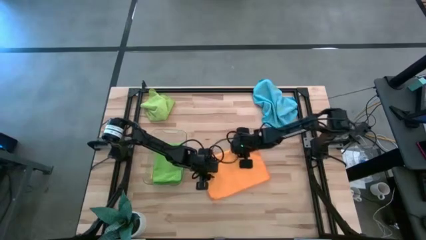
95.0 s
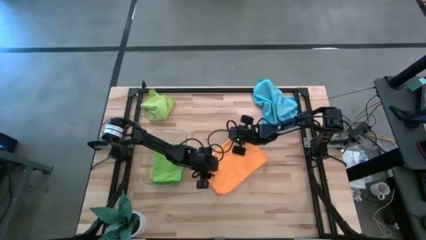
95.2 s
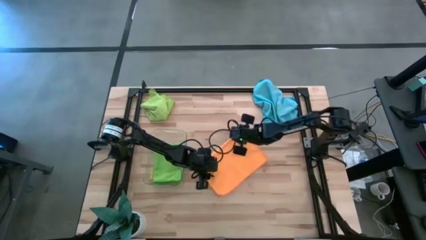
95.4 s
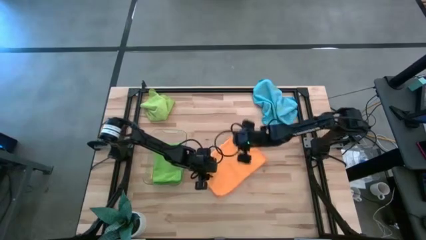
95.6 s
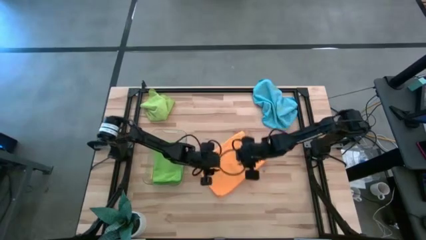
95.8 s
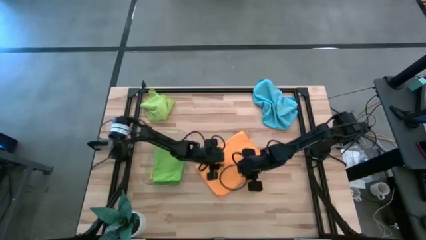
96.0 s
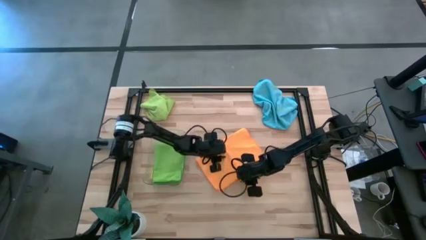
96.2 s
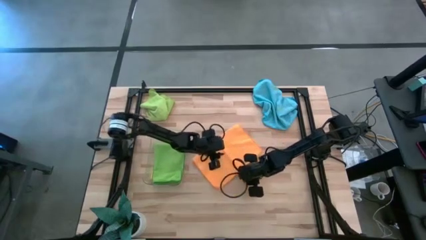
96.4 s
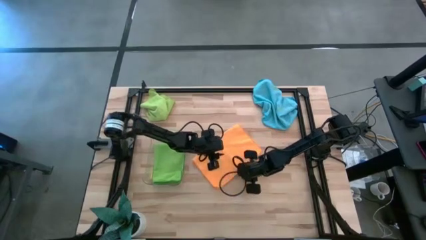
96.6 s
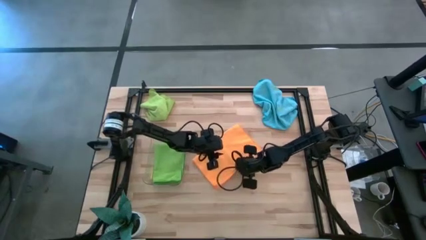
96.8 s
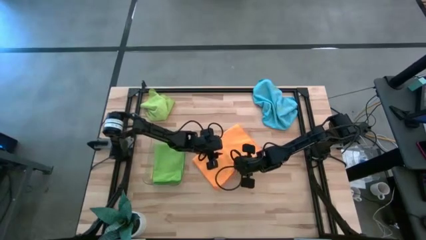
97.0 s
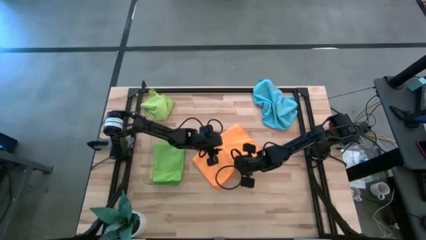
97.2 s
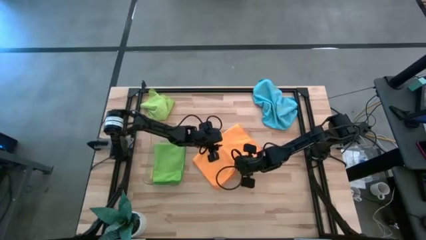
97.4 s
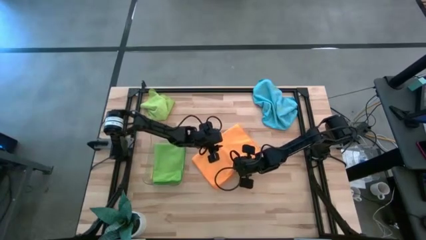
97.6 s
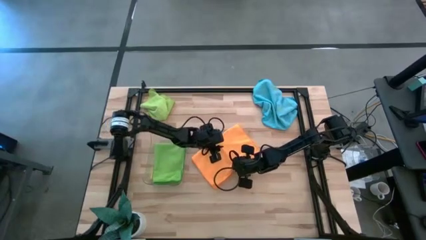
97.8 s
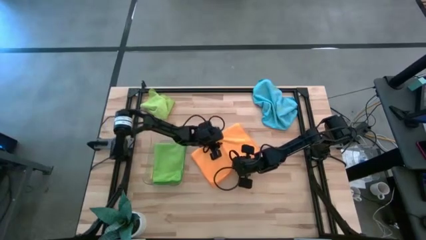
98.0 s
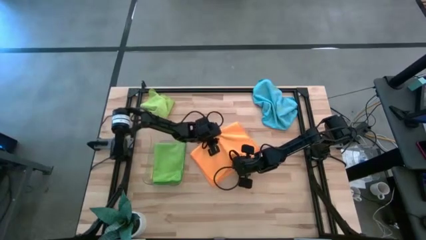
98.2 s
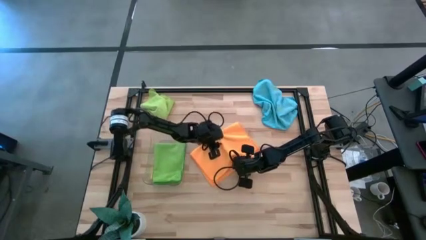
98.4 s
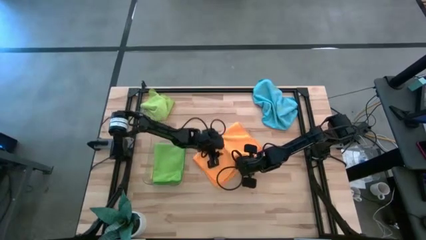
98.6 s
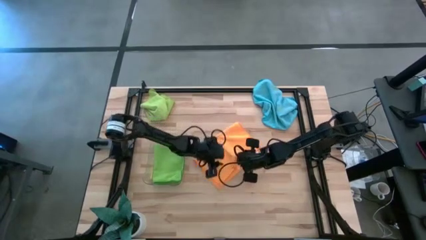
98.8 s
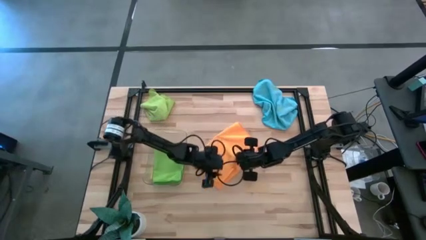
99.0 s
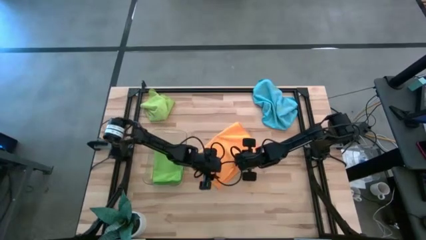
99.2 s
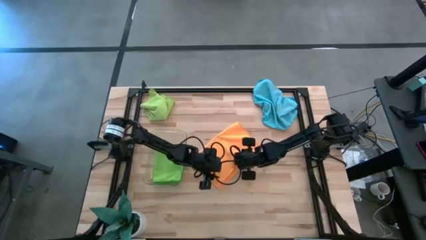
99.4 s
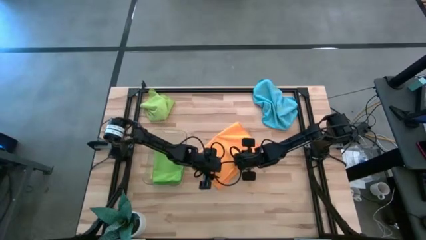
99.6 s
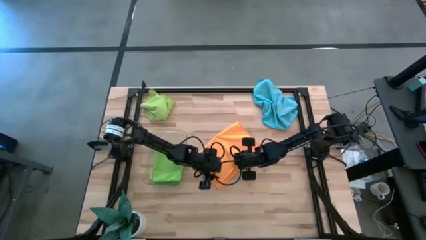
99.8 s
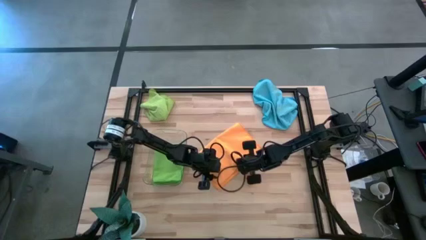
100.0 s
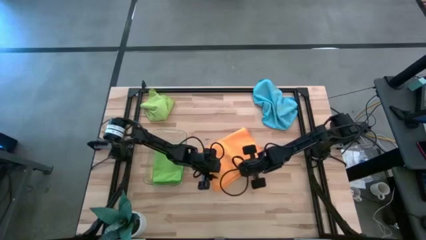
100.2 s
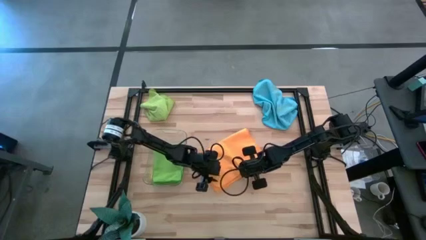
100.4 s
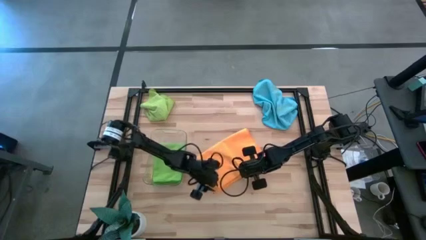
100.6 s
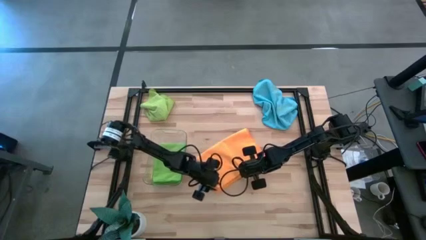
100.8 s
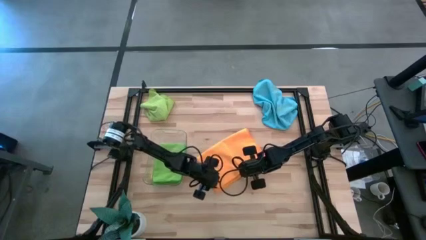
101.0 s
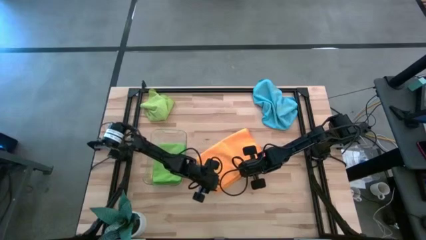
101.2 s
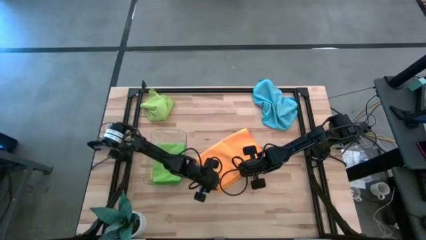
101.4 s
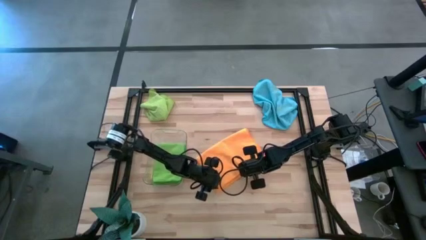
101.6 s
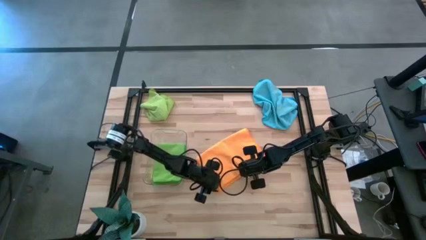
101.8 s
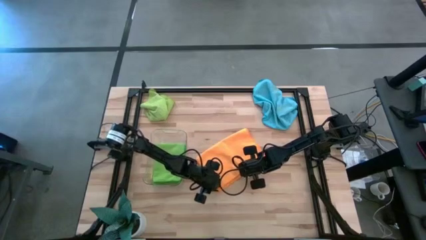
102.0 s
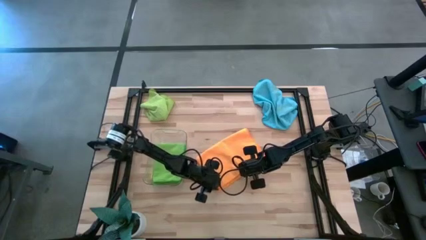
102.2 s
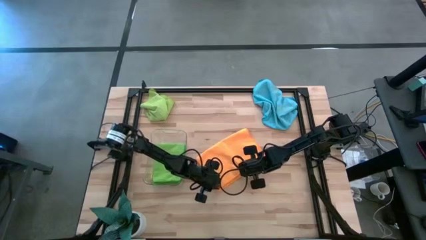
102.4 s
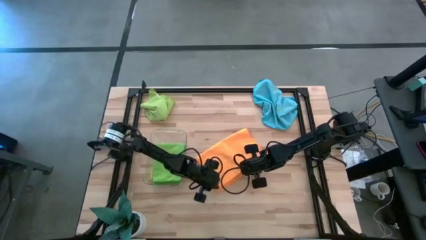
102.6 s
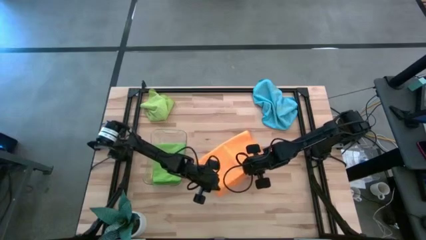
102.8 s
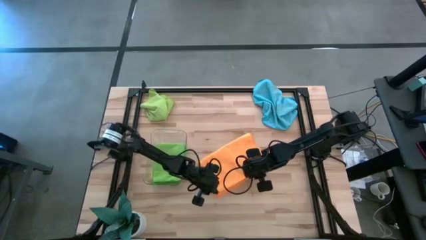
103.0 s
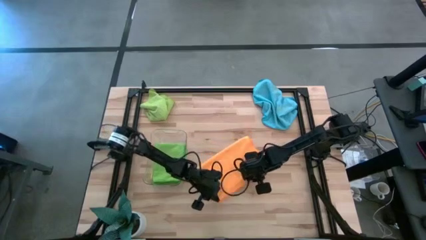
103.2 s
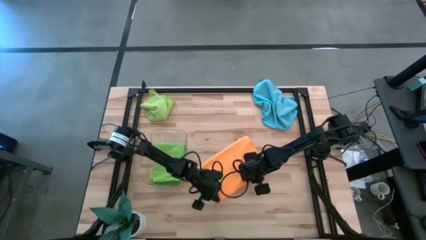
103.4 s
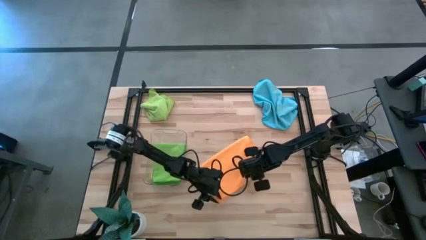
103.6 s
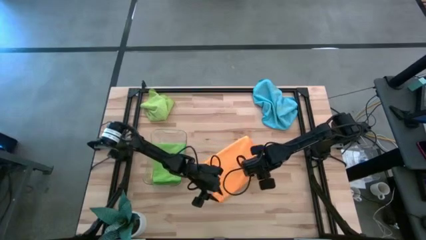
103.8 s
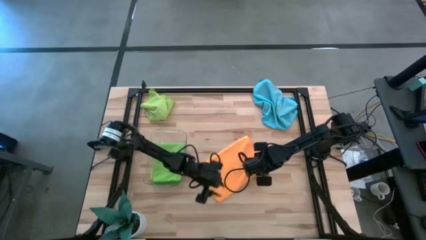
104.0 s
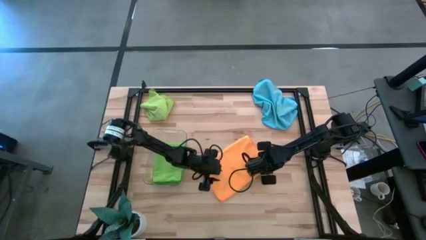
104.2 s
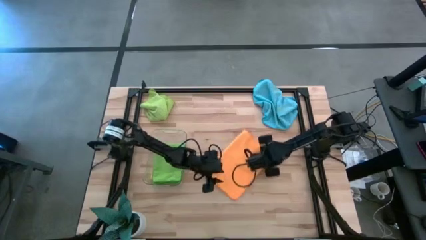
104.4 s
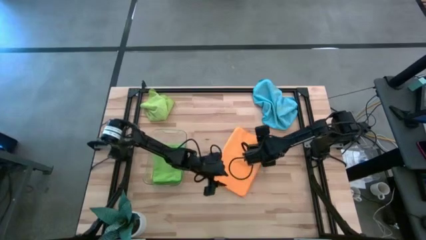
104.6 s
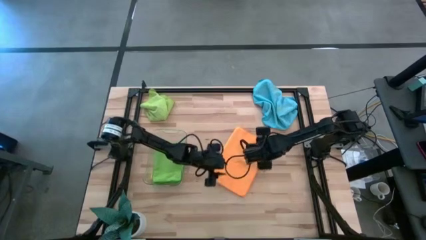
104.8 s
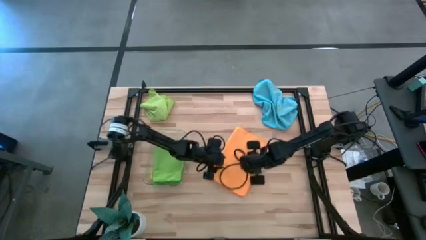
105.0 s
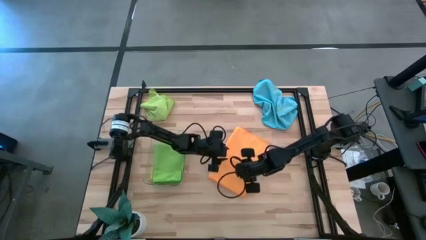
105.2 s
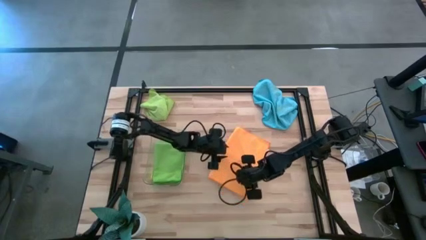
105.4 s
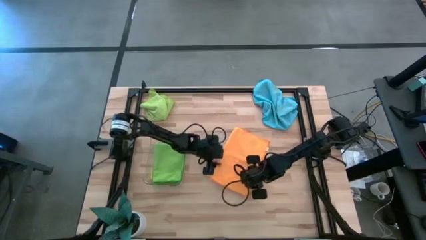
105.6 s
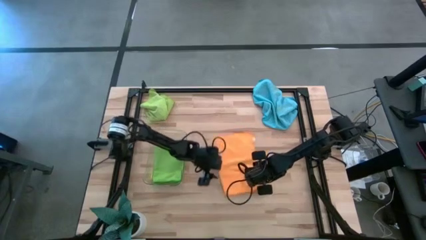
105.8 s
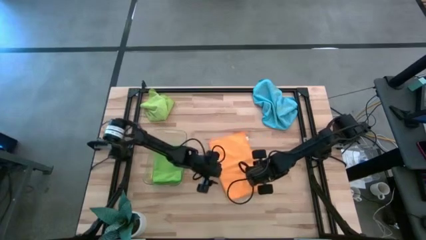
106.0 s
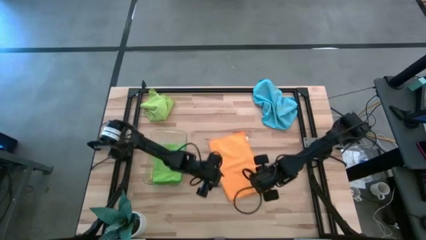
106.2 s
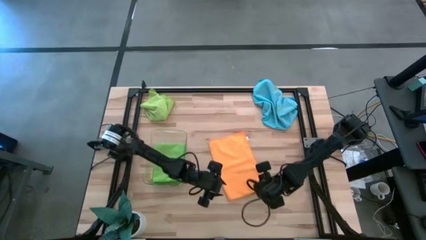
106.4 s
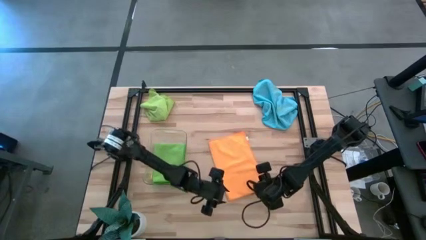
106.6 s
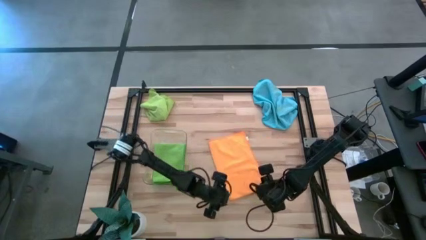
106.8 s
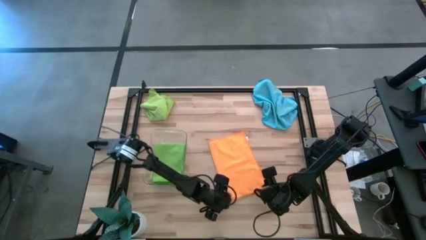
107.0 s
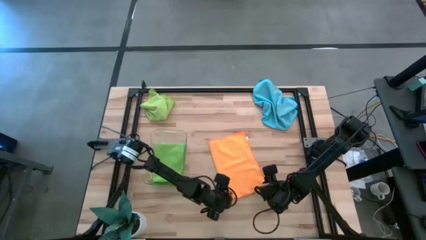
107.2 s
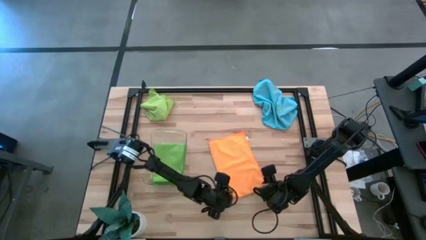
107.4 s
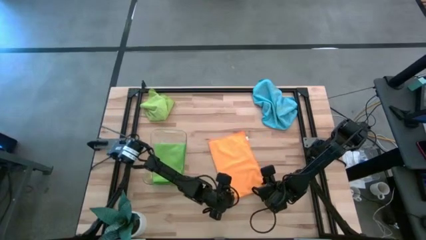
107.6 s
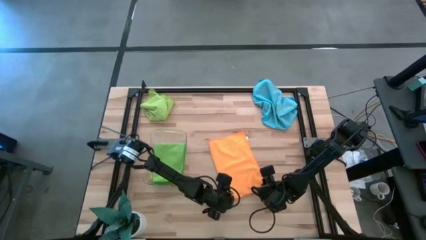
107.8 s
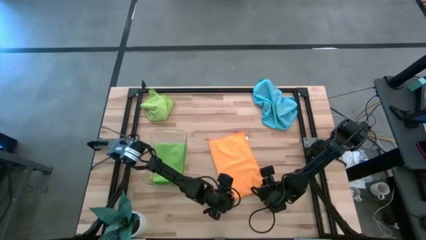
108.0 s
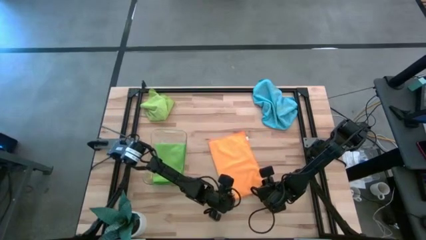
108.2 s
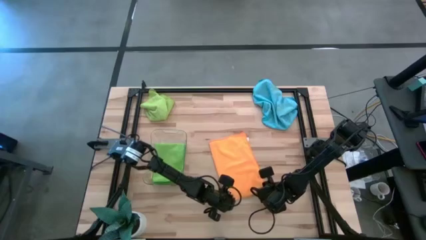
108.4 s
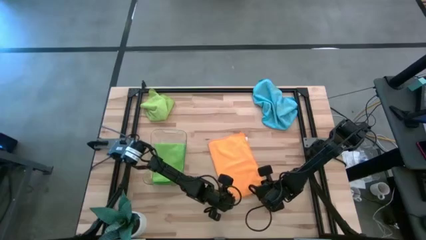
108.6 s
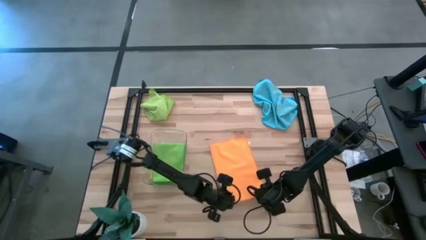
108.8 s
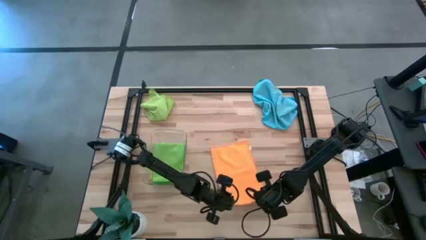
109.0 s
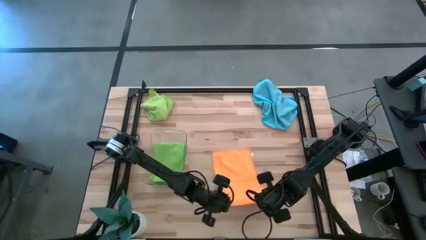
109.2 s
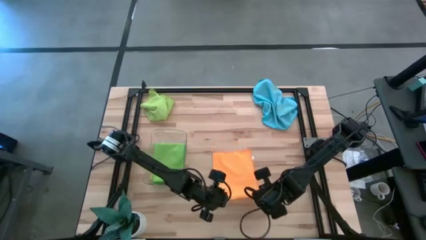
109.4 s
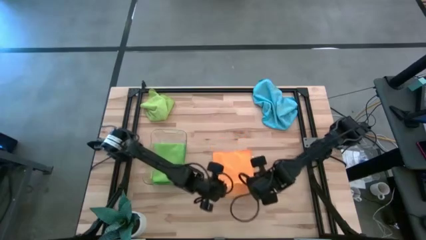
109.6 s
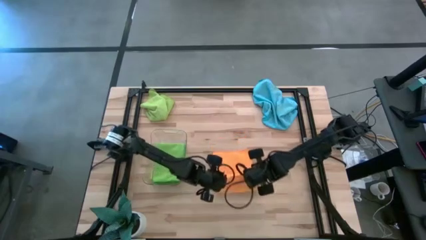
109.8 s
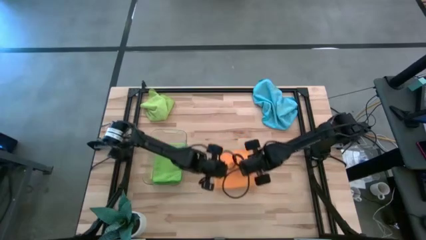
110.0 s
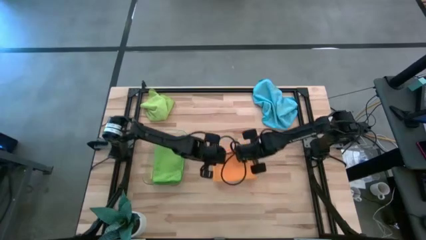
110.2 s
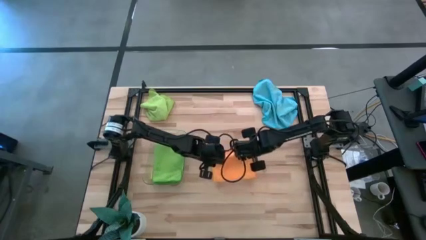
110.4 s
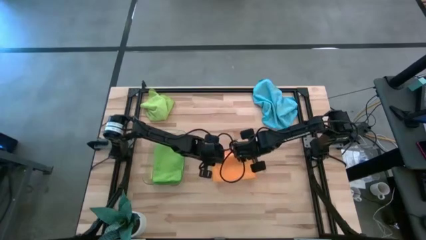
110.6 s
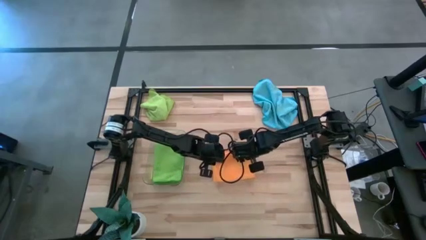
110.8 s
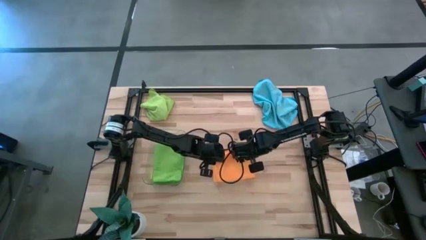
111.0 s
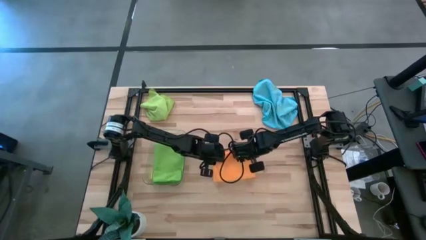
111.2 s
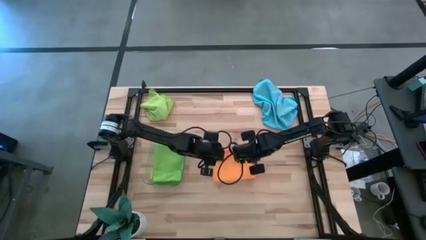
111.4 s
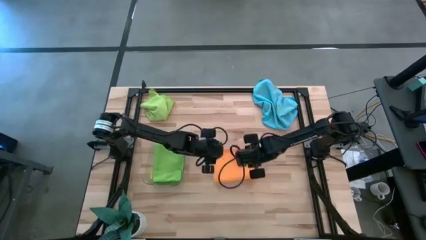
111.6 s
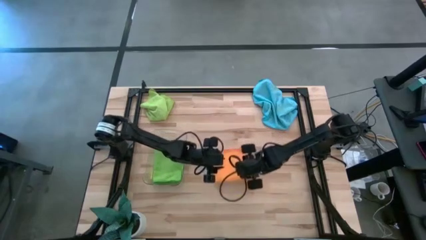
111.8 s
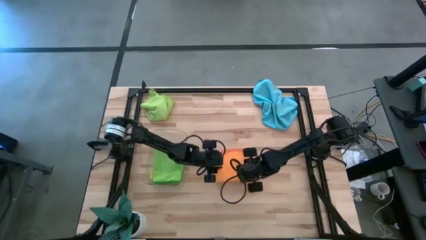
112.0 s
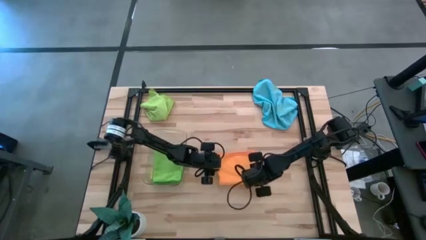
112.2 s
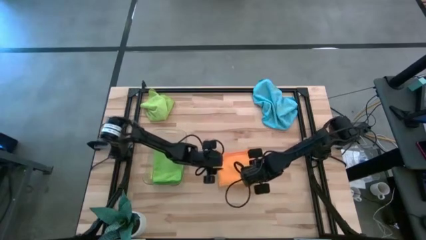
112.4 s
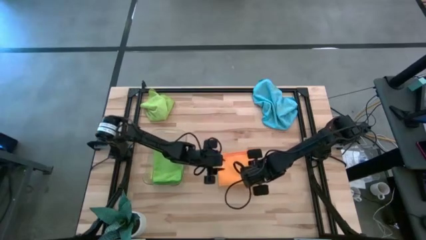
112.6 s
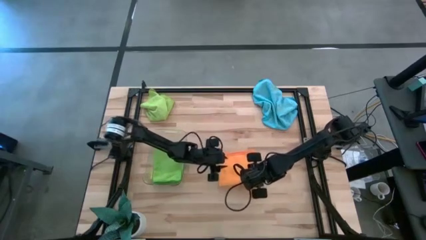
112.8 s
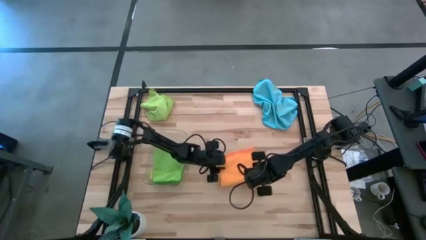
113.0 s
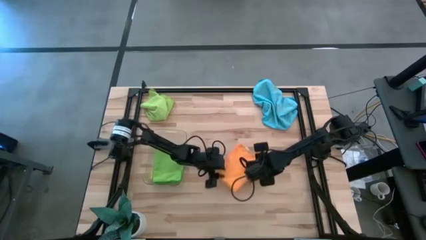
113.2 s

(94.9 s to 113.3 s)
Task: Fold microfiber towels
Fold the orange microfiber towel on the table
